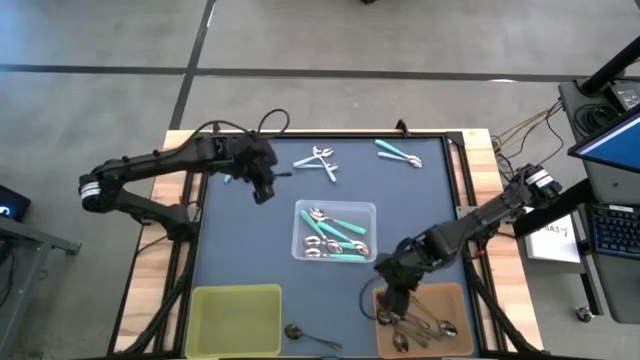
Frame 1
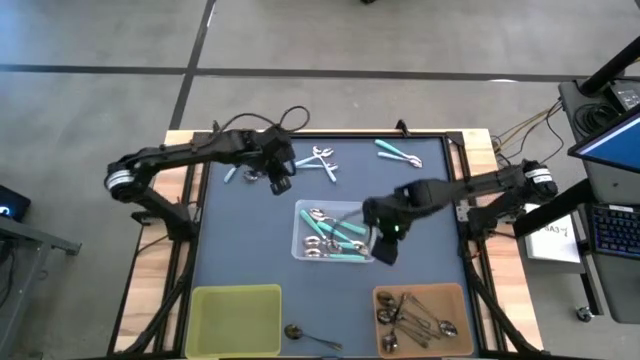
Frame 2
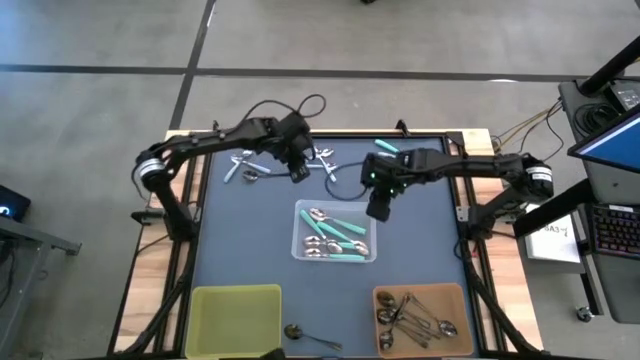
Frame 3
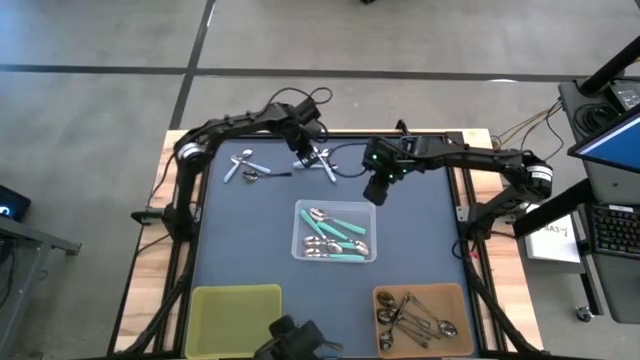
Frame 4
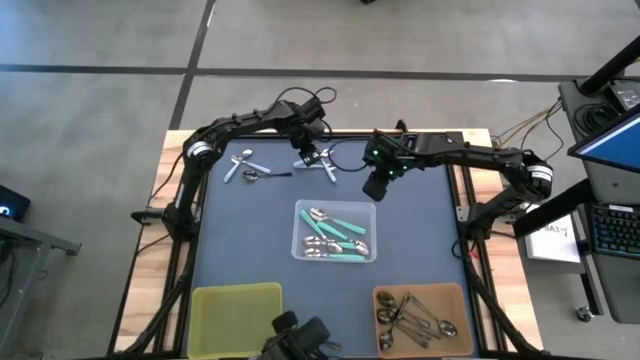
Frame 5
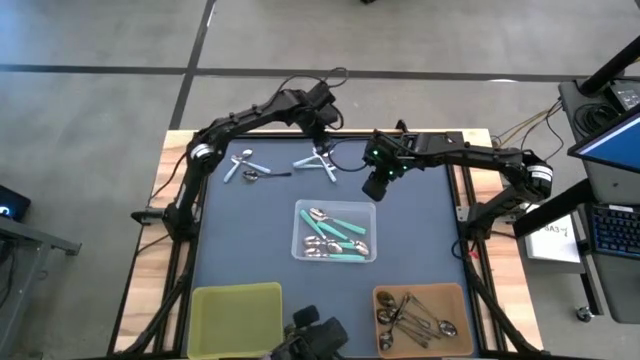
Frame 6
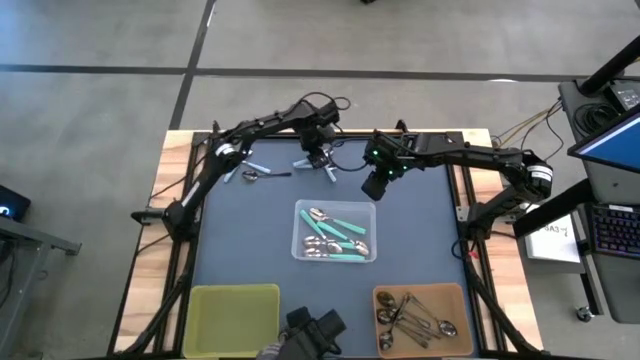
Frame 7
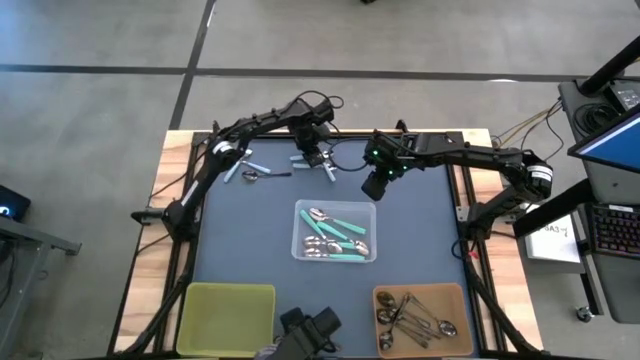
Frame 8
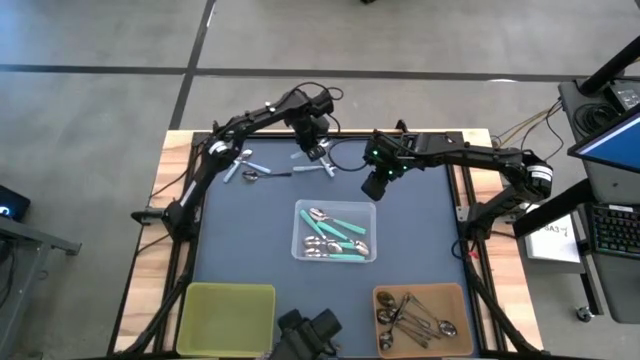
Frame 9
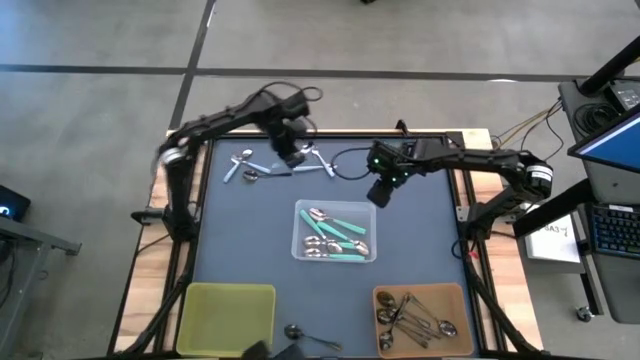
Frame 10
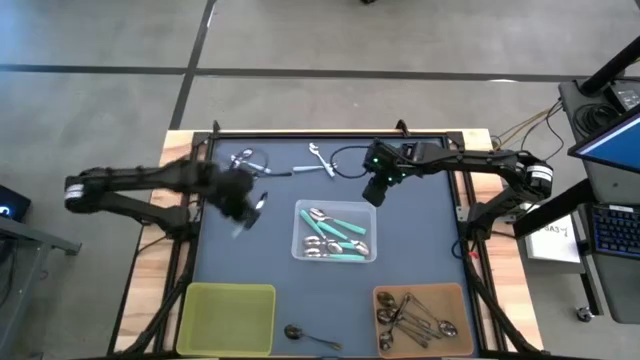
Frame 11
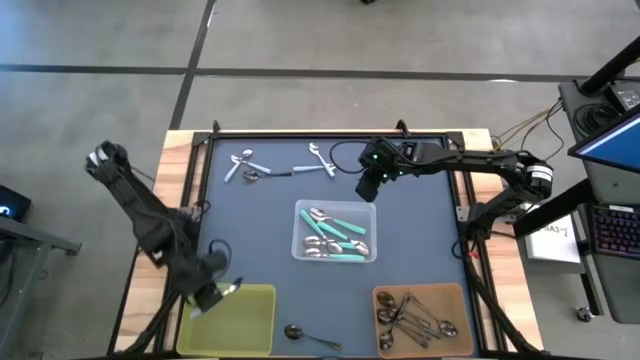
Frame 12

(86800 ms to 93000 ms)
Task: Sort silverware by color (type)
Put the light blue spoon into the yellow bin

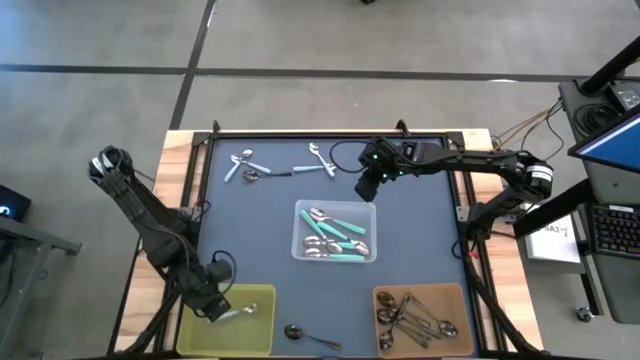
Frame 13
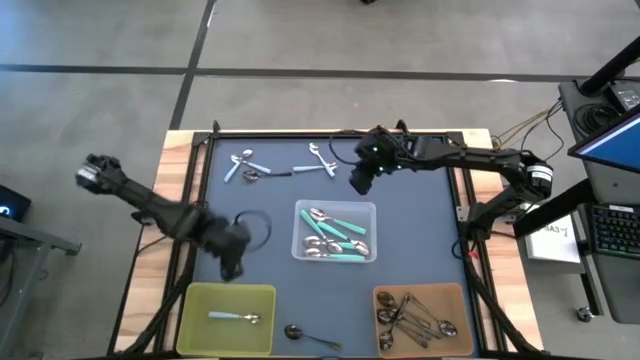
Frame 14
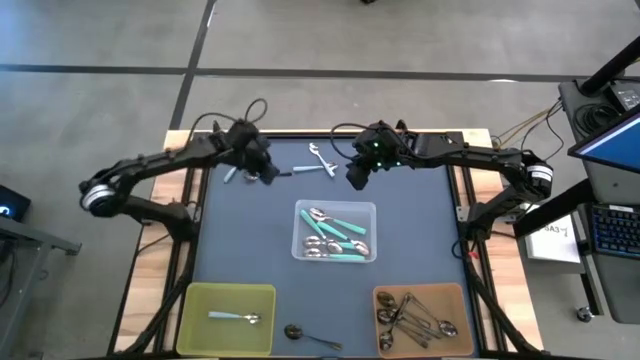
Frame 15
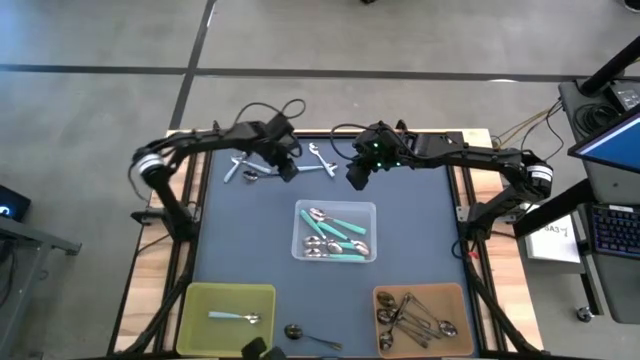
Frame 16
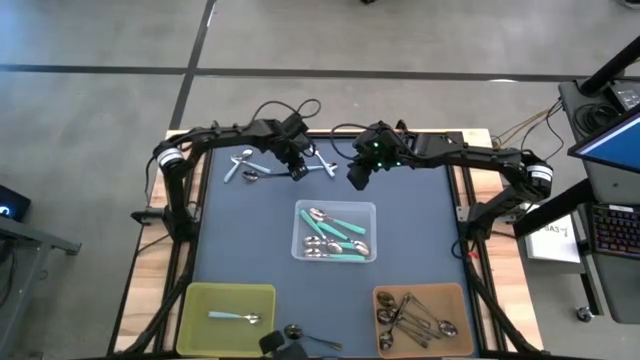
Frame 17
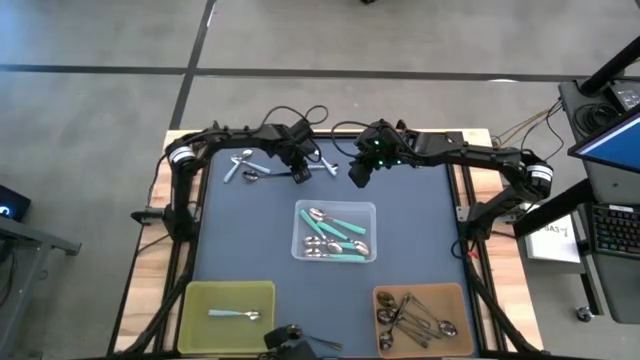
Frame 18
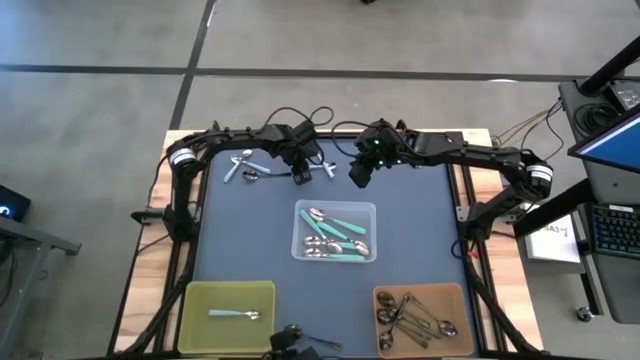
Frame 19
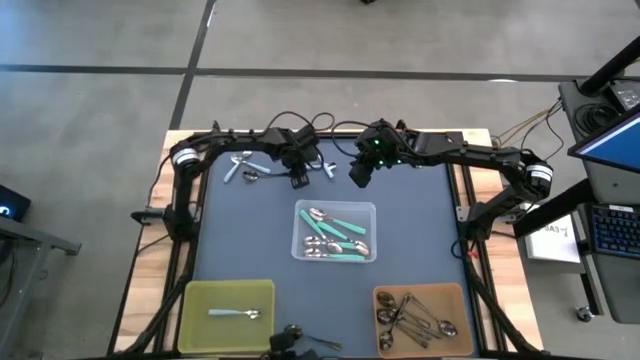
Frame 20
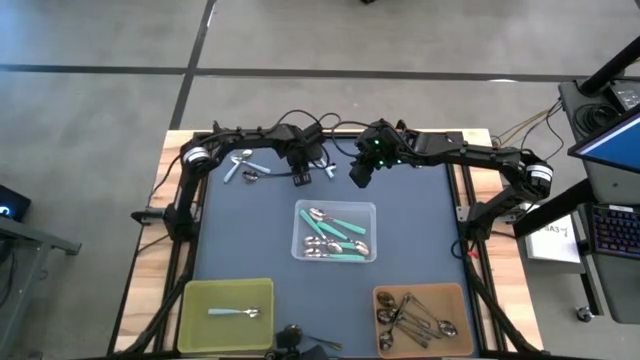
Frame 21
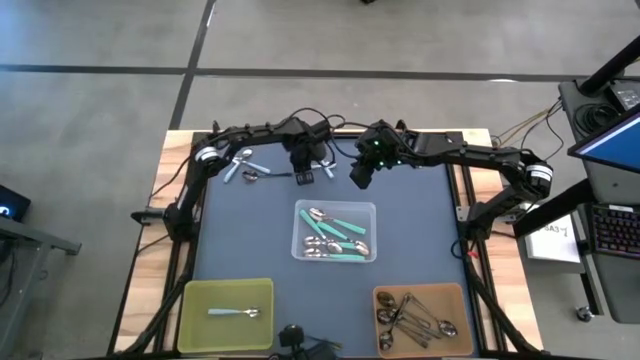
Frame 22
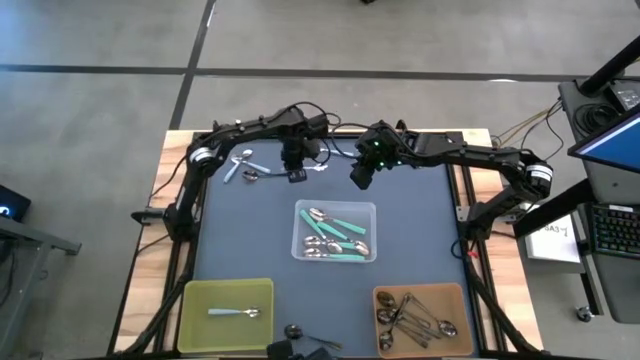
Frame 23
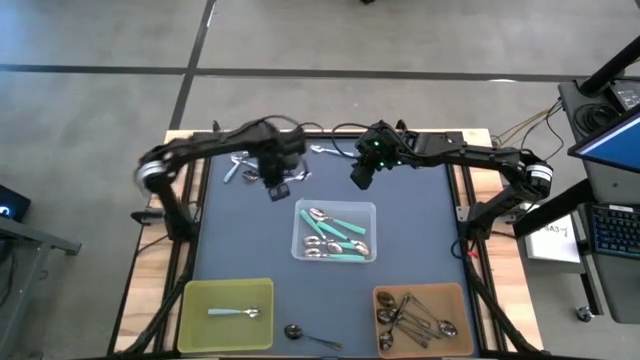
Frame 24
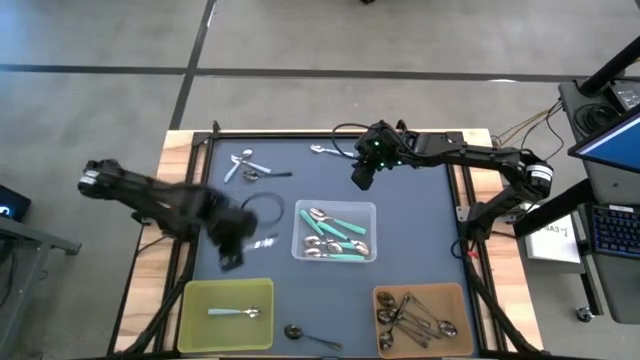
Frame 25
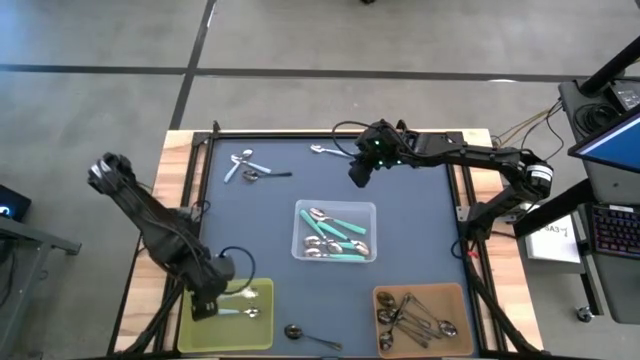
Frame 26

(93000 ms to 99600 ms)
Put the light blue spoon into the yellow bin

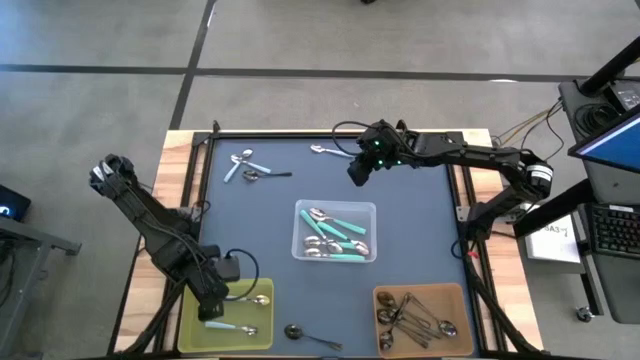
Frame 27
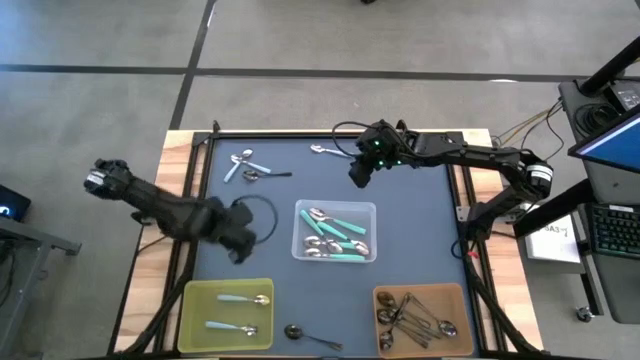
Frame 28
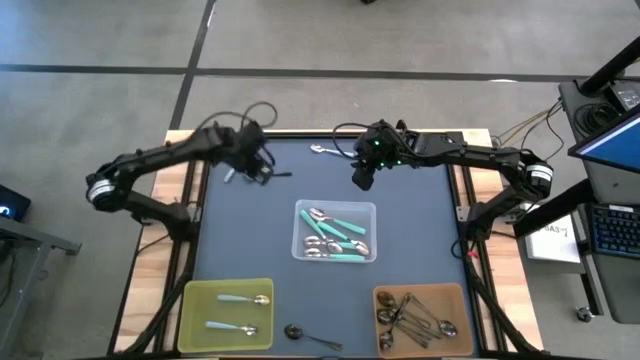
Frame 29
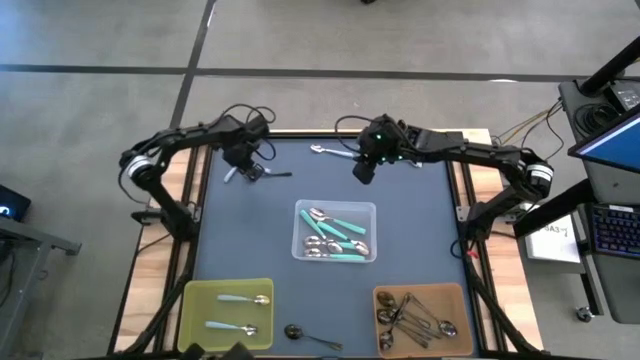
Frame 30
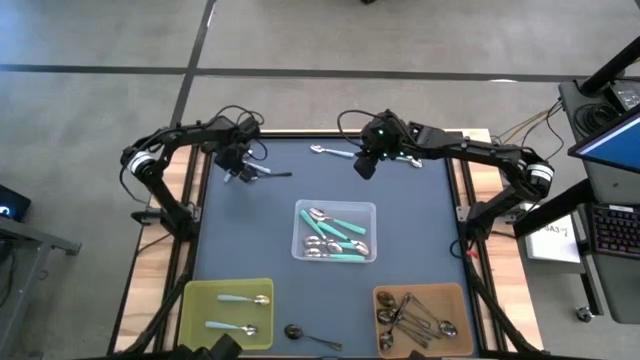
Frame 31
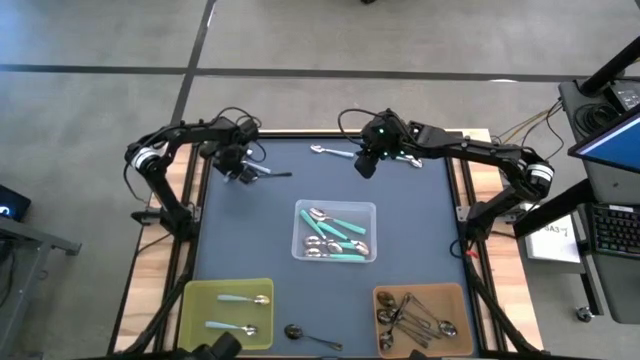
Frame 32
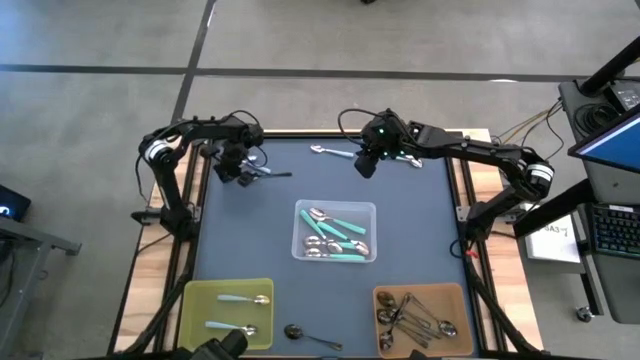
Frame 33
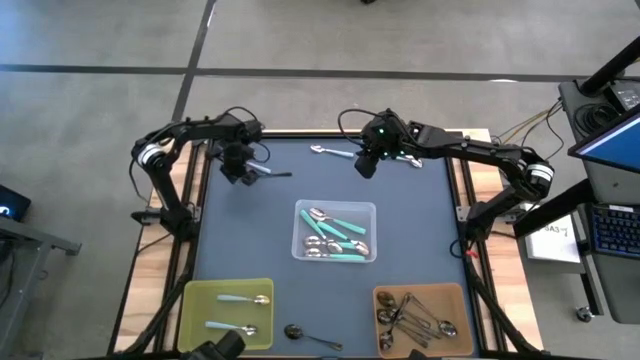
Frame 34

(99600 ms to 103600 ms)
Put the light blue spoon into the yellow bin

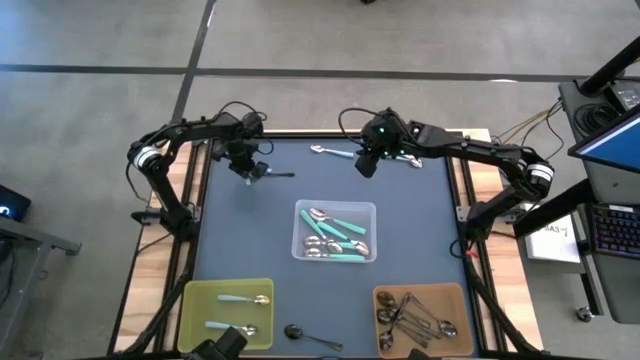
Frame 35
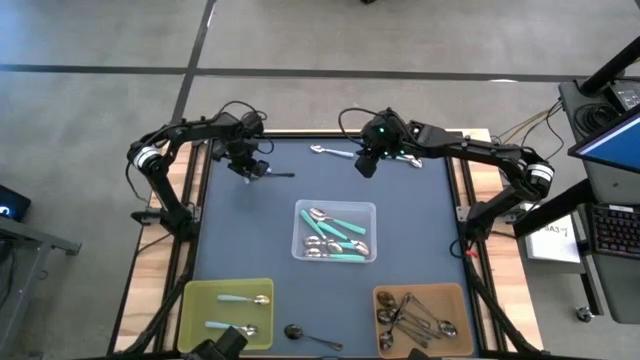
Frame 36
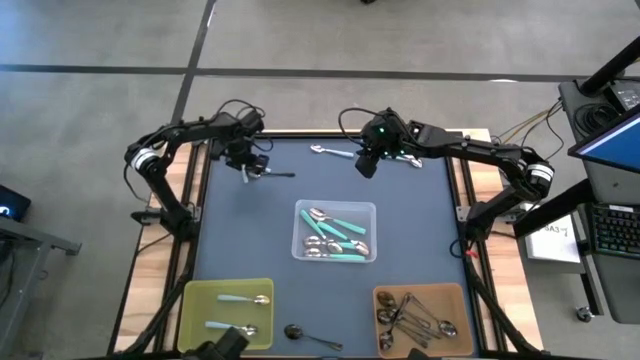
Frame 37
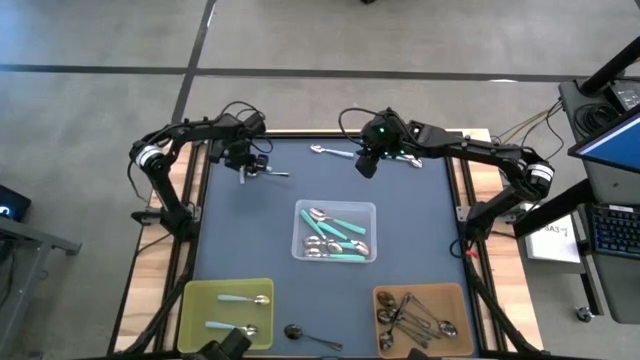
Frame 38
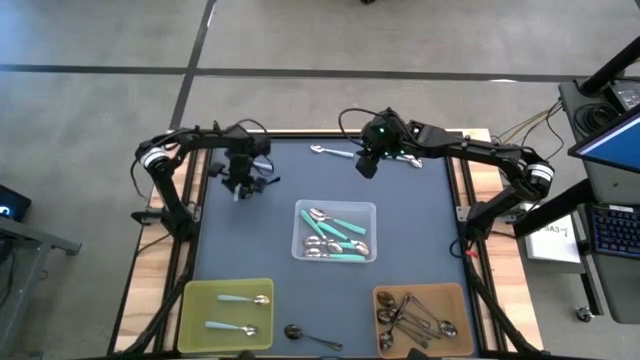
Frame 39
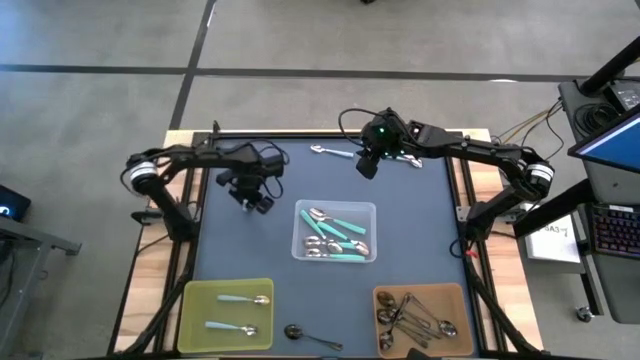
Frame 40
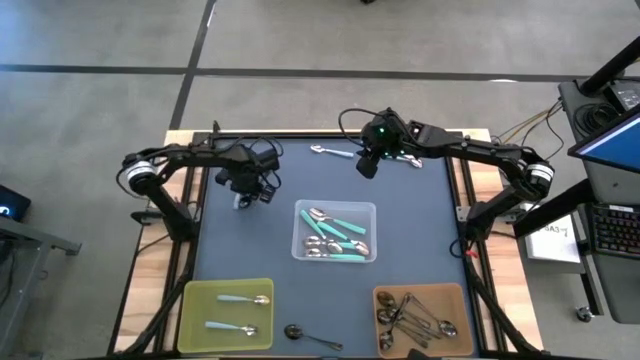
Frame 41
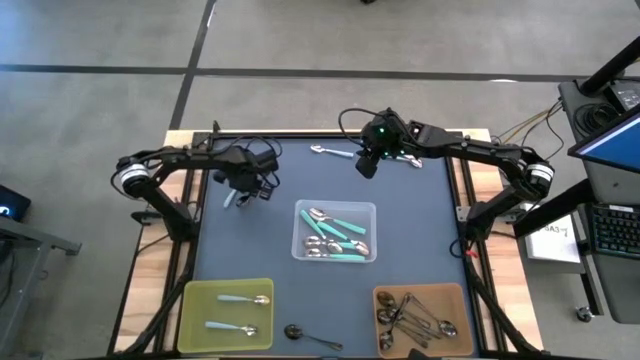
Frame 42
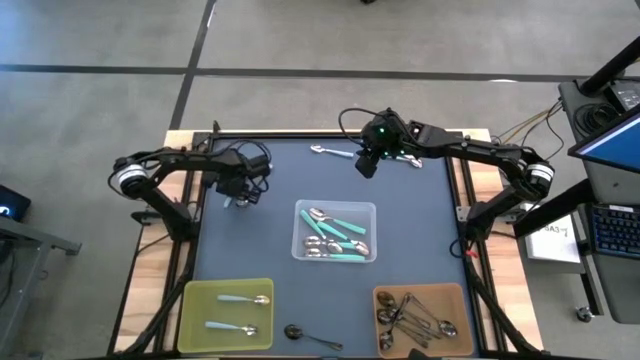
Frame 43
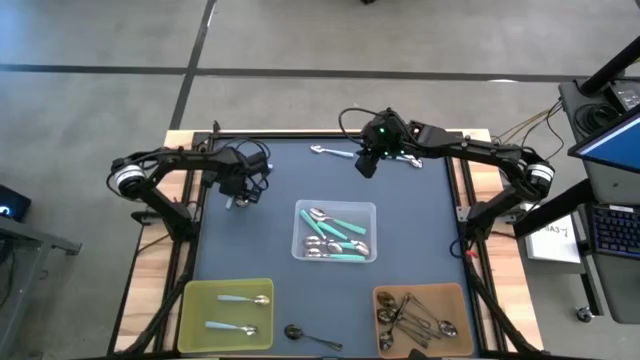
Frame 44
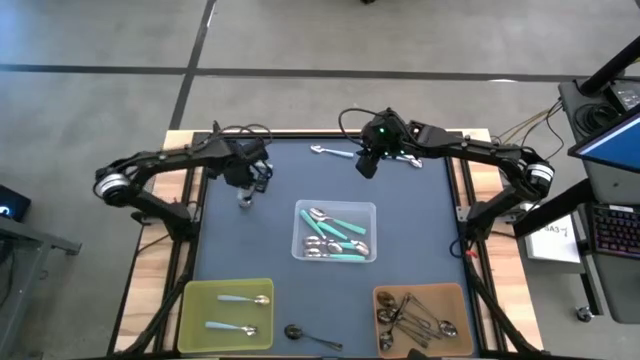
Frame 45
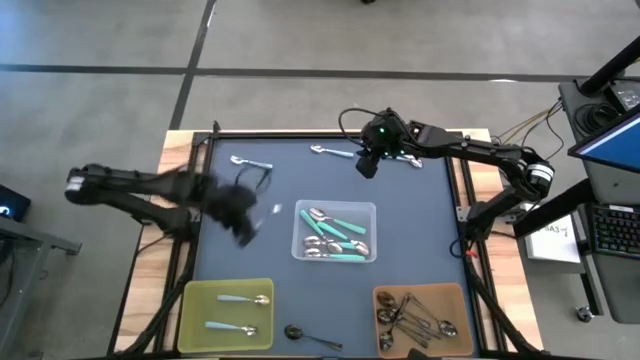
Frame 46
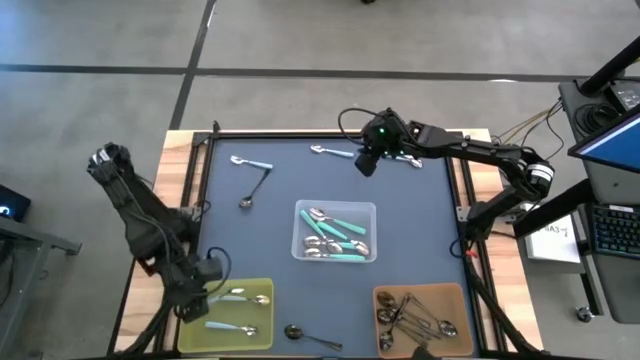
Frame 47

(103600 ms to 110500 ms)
Put the light blue spoon into the yellow bin
